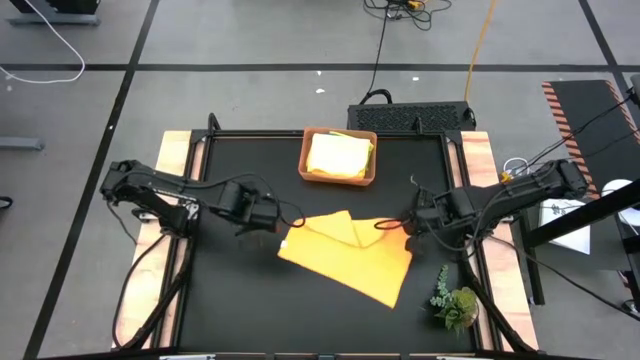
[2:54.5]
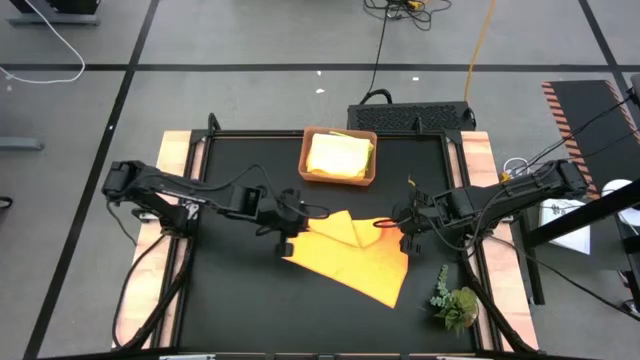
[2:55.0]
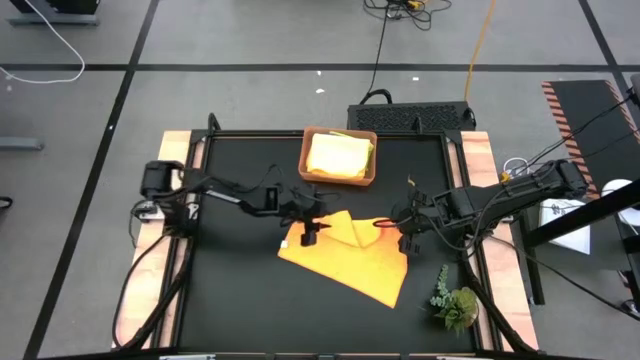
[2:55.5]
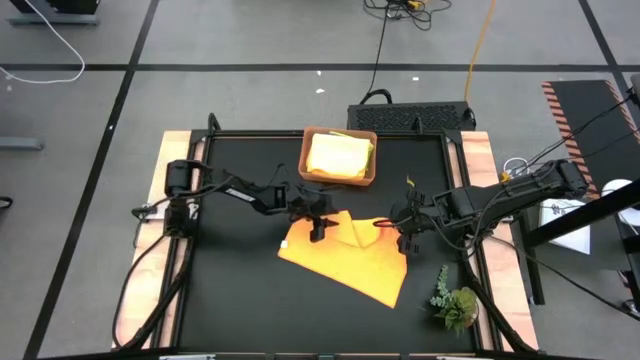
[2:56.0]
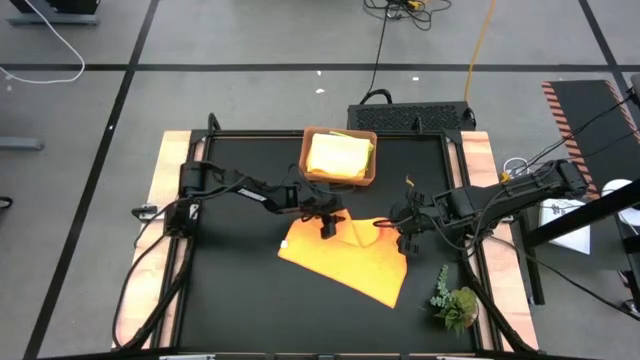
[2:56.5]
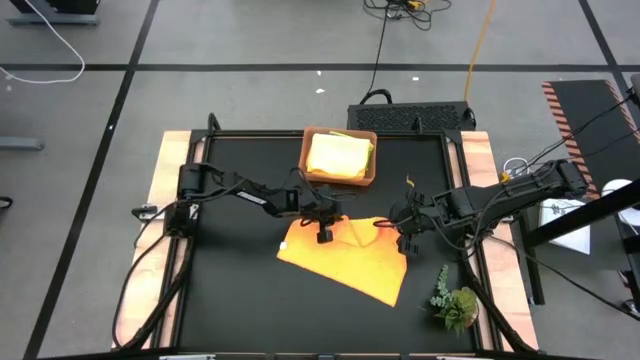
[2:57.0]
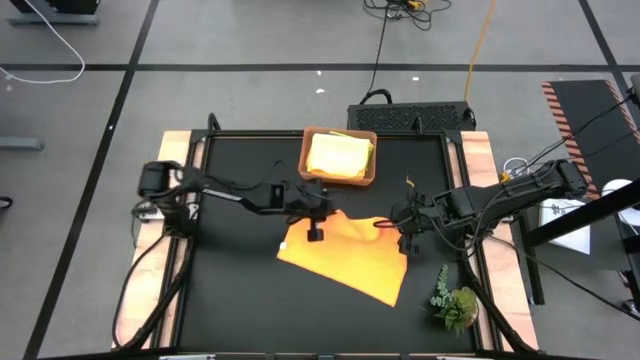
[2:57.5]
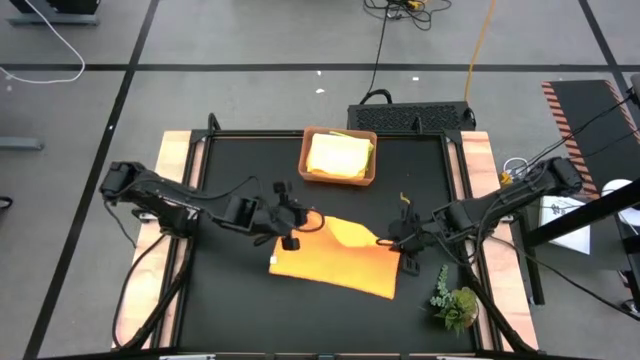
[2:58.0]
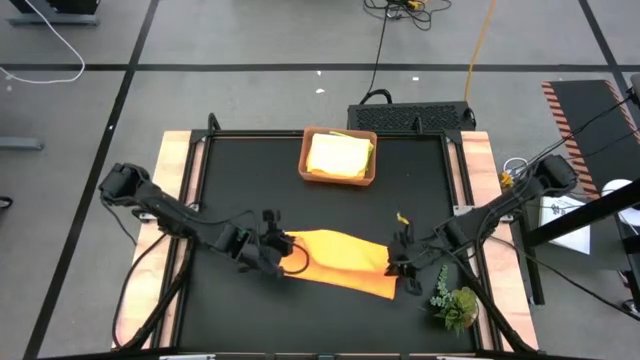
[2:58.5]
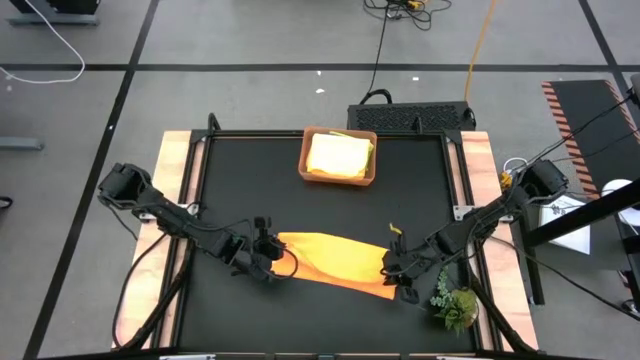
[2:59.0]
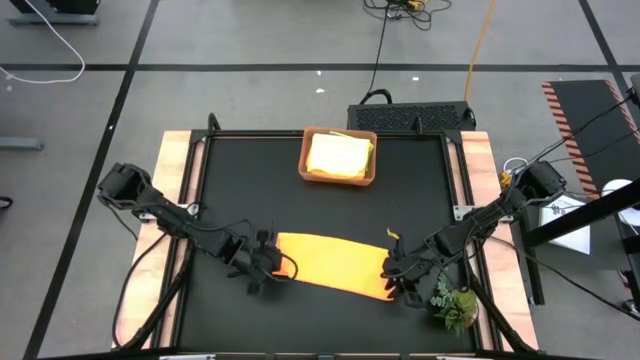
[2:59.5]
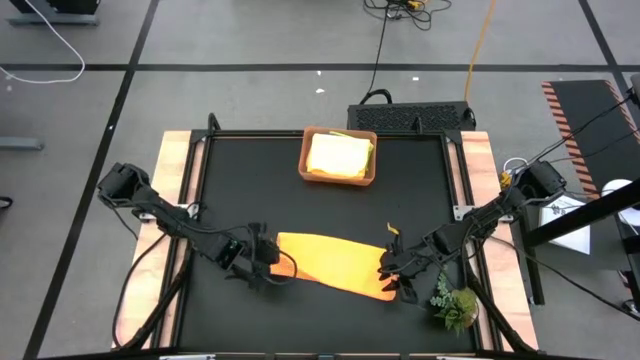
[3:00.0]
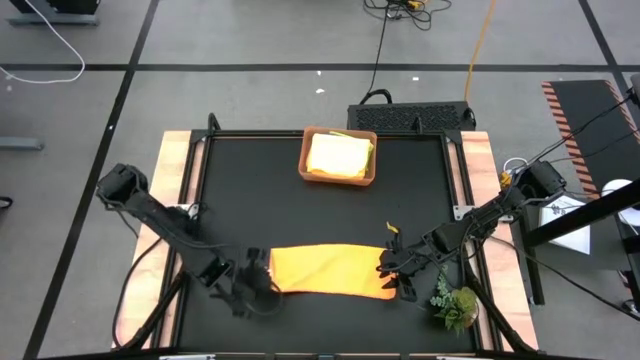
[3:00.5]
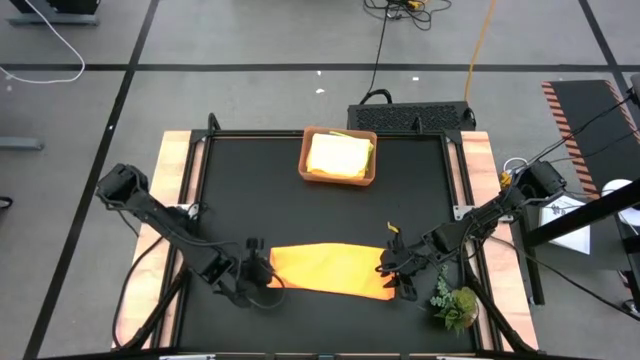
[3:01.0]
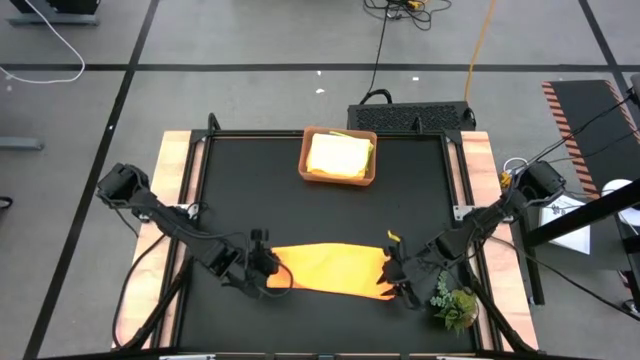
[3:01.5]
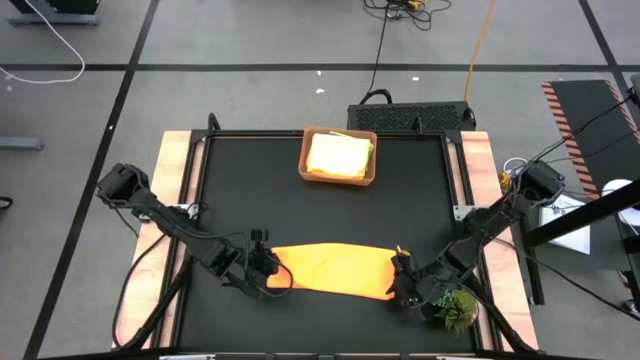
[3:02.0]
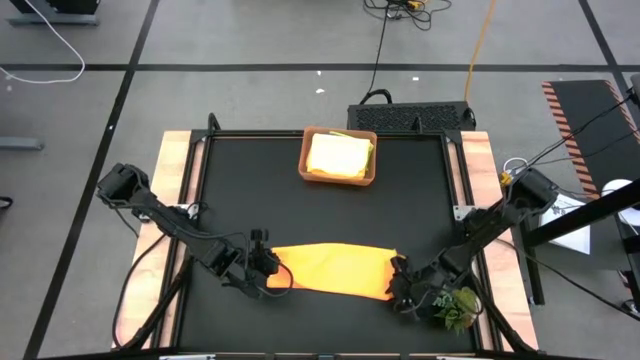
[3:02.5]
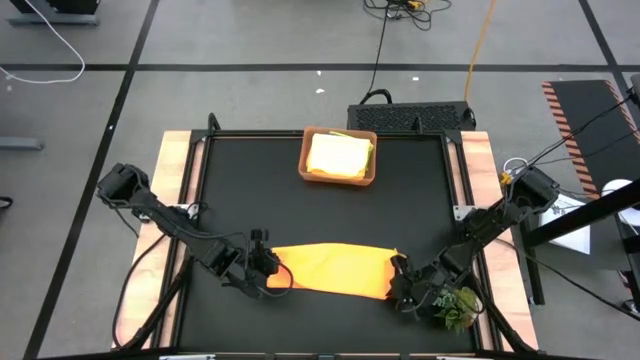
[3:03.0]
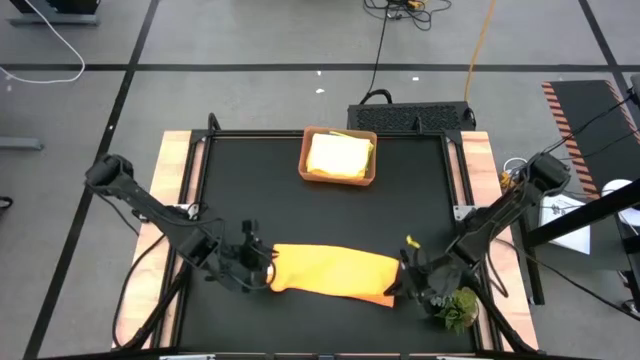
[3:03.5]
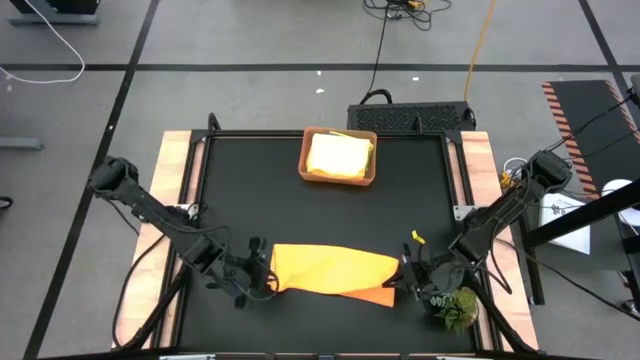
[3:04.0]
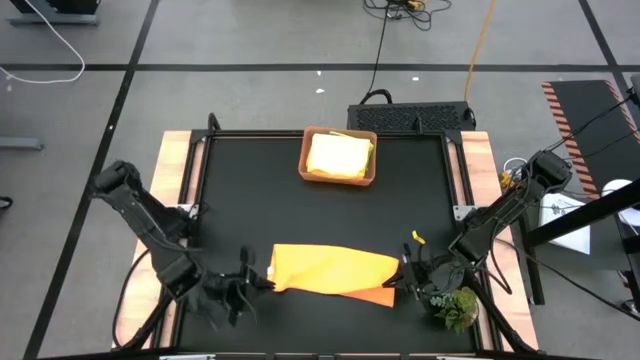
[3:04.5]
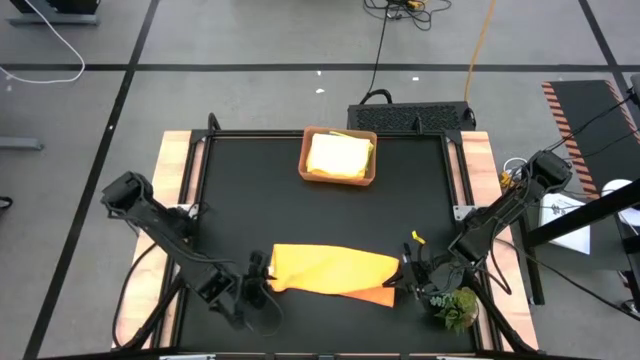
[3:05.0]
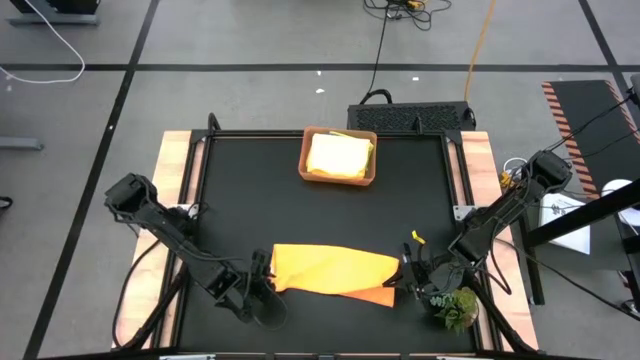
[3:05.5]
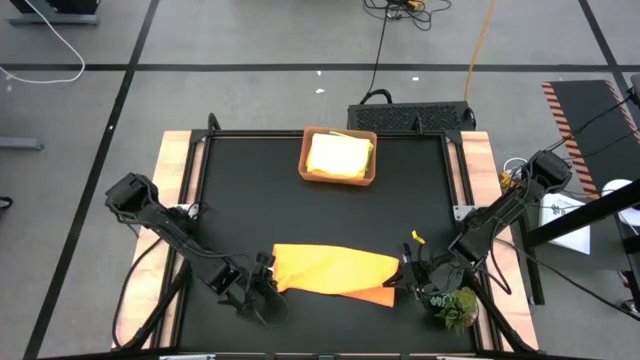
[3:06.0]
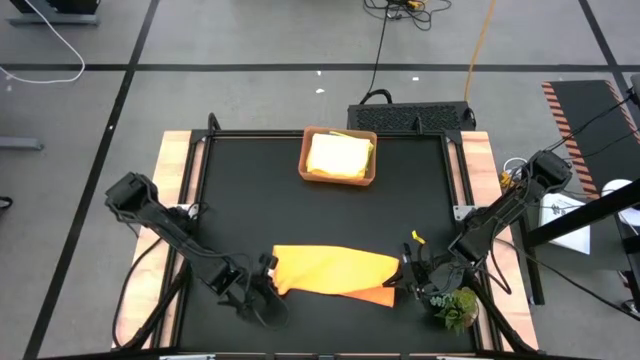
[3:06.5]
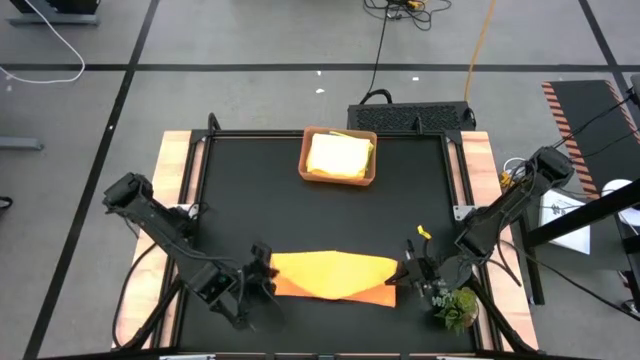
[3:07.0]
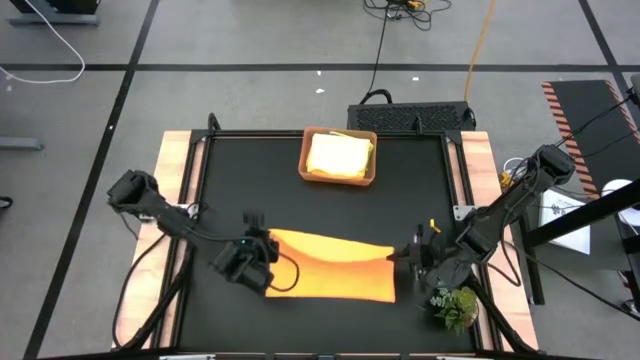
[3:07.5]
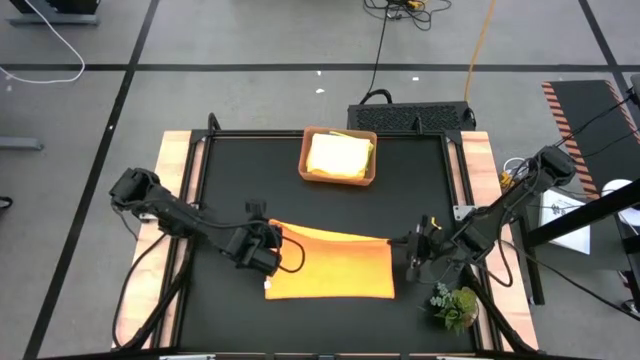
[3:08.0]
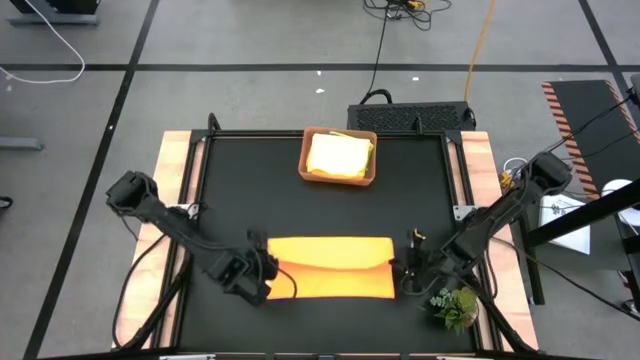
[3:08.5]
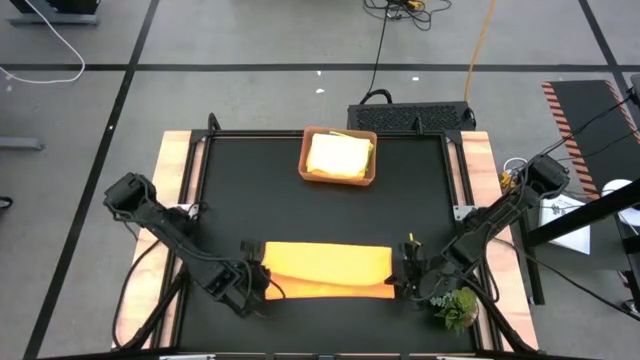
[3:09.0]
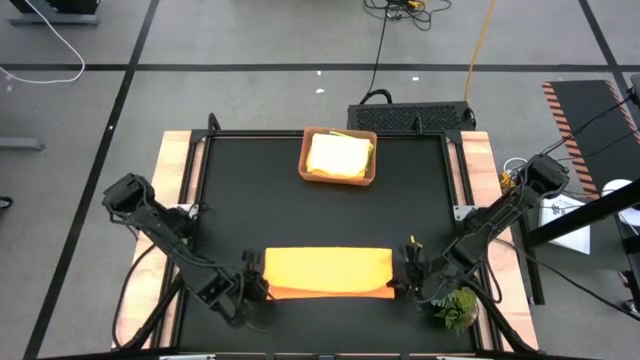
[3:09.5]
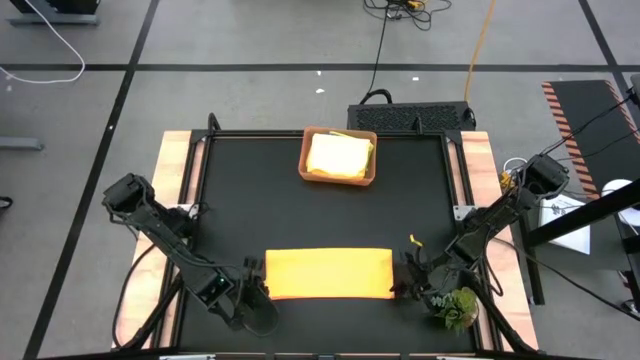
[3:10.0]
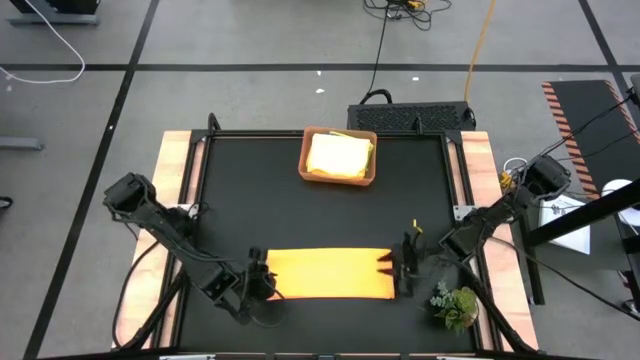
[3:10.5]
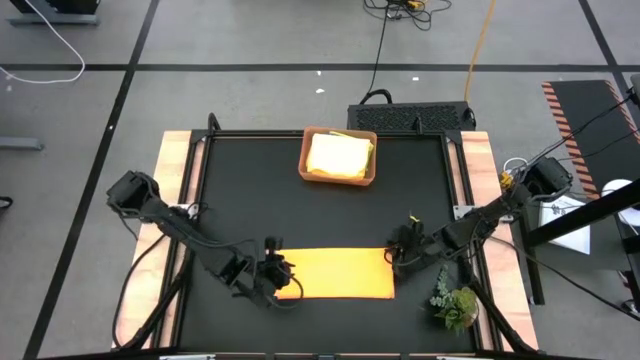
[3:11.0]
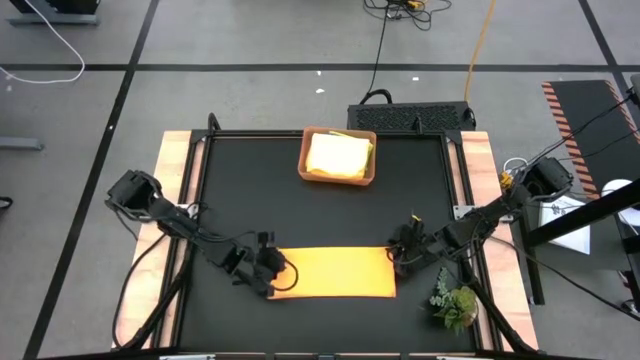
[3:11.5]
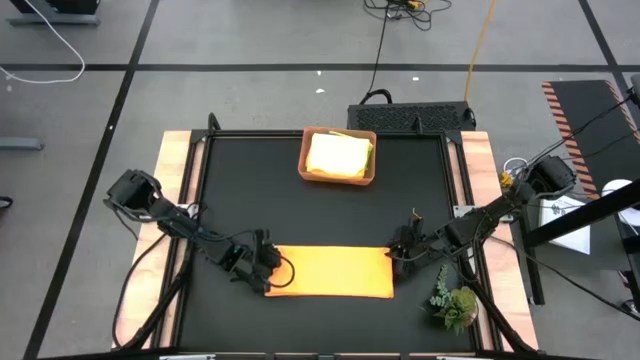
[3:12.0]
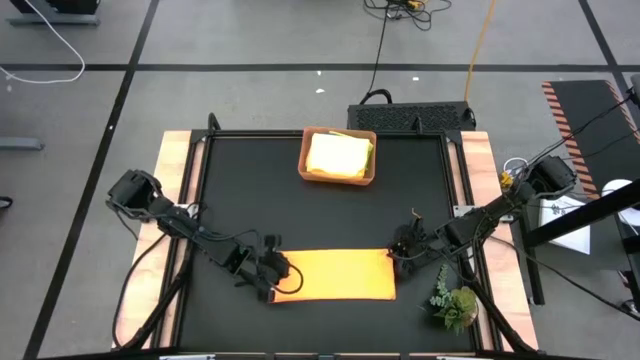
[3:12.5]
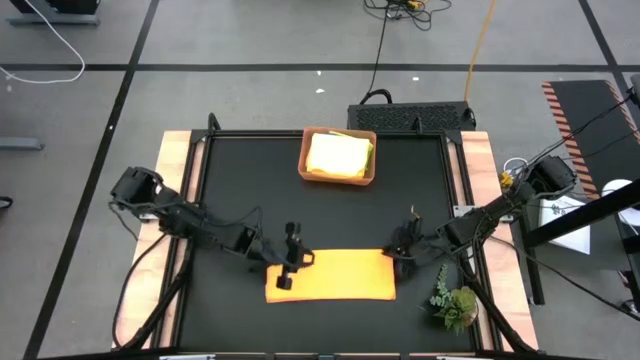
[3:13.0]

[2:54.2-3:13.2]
Task: Fold microfiber towels
Fold the orange microfiber towel

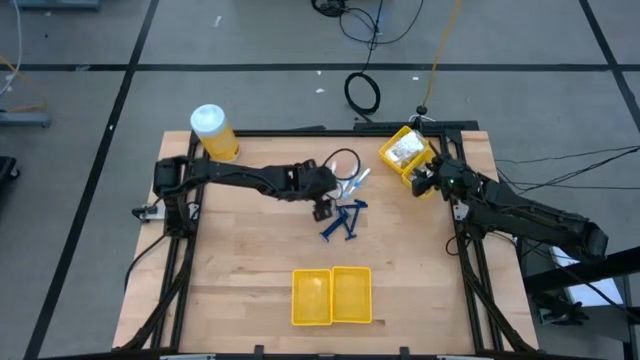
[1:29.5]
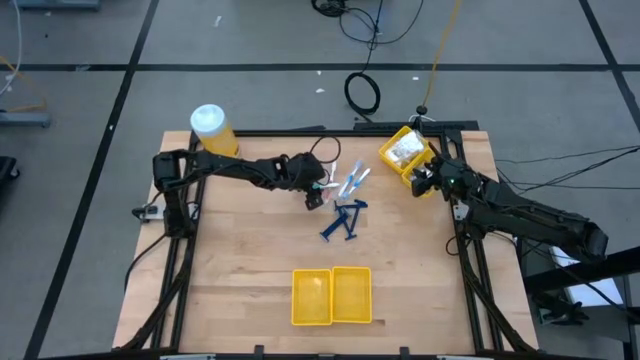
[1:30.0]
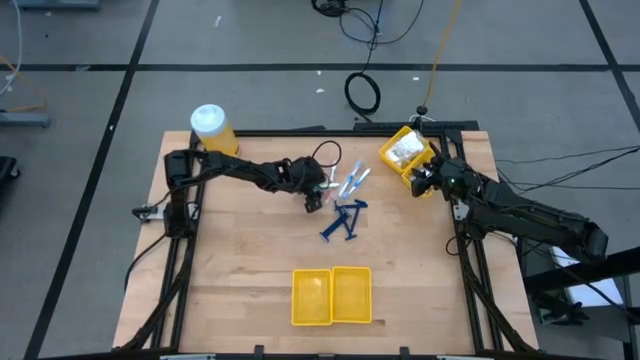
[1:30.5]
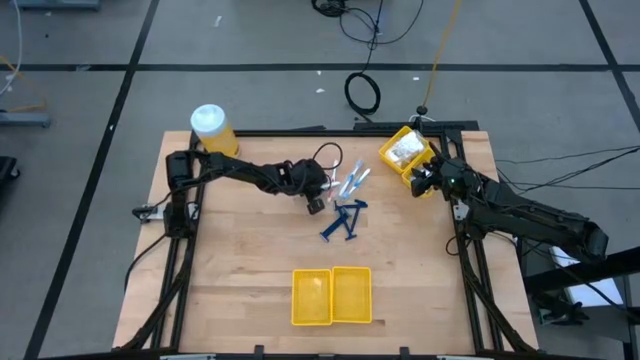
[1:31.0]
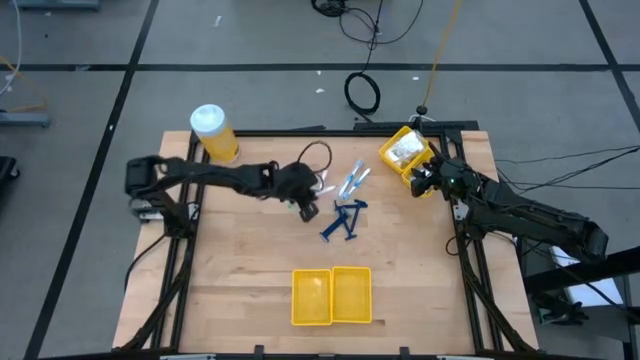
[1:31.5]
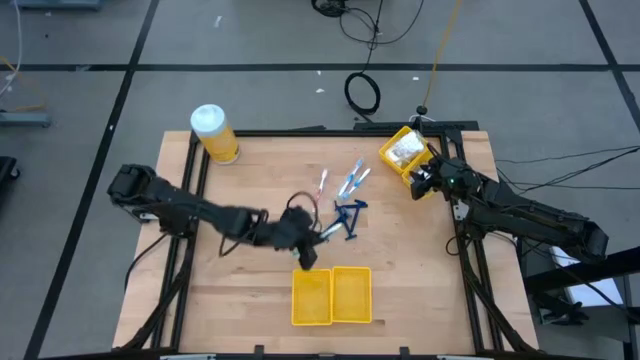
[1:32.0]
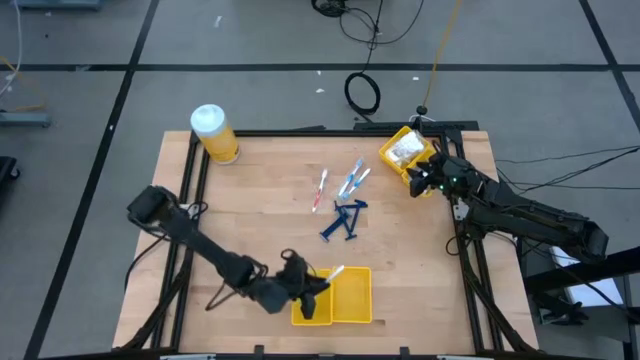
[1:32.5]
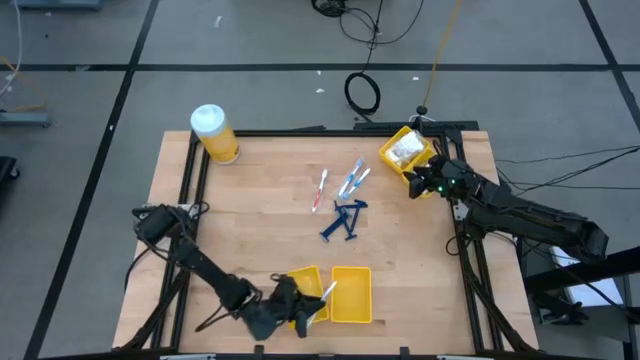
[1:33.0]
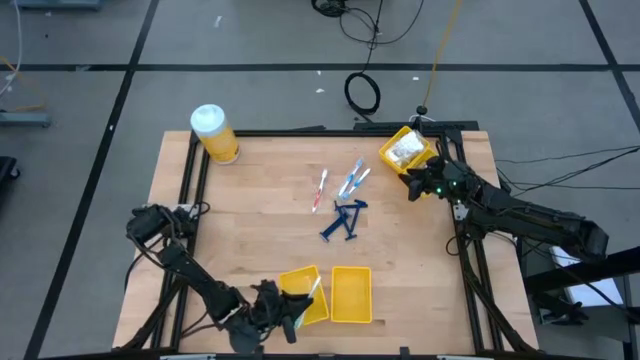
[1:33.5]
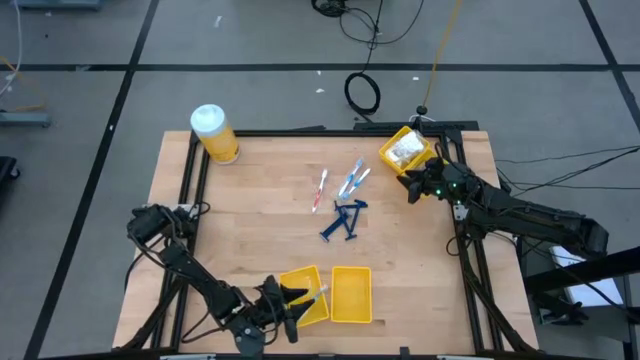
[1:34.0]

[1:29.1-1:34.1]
Task: Pick & Place Travel size toiletries
Put the white and green toothbrush into the bottom left yellow bin
